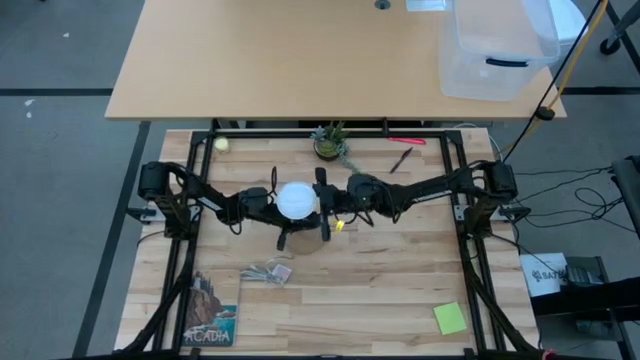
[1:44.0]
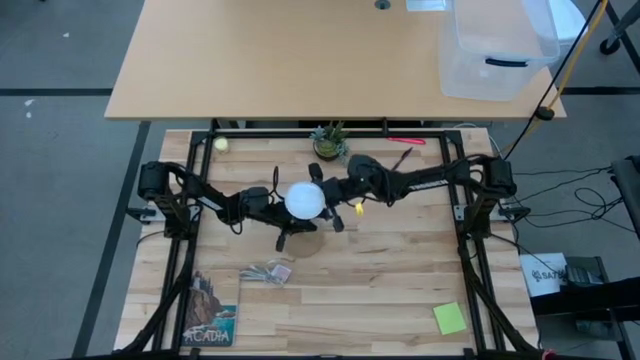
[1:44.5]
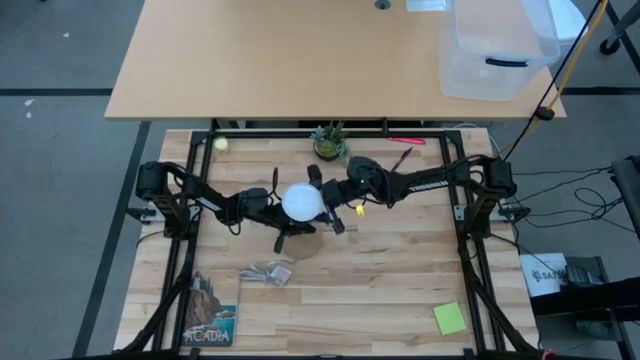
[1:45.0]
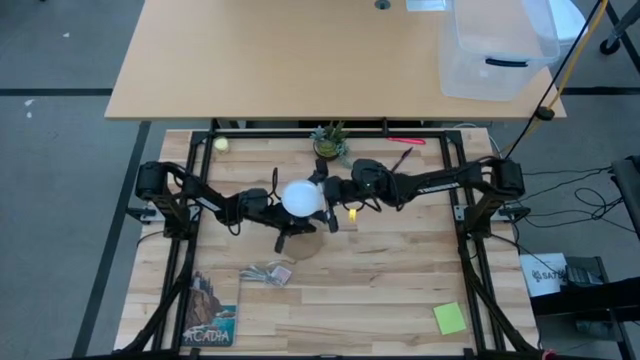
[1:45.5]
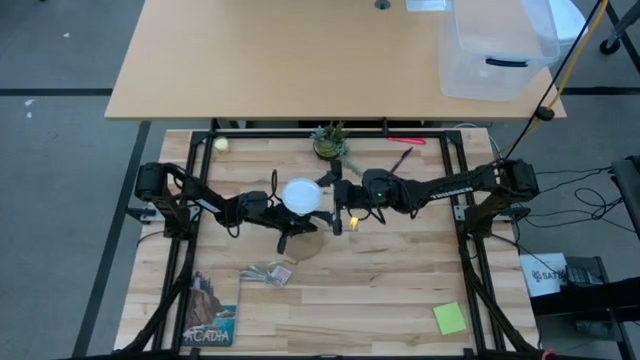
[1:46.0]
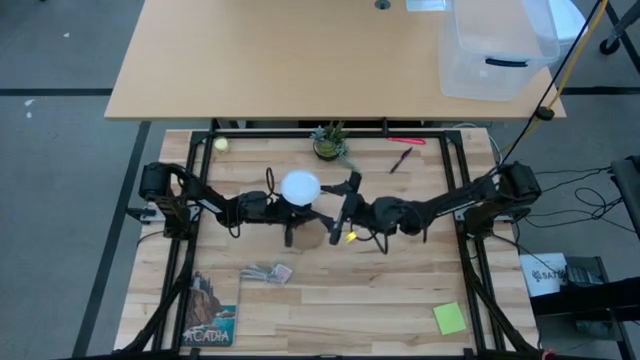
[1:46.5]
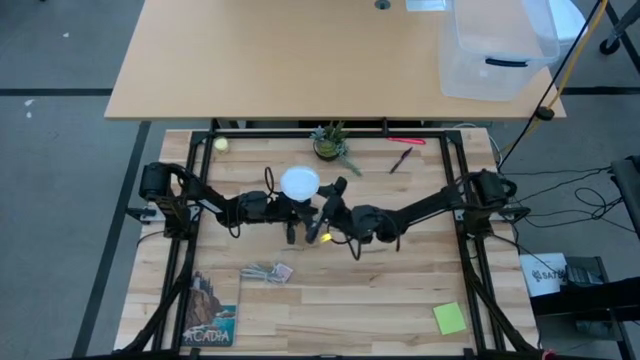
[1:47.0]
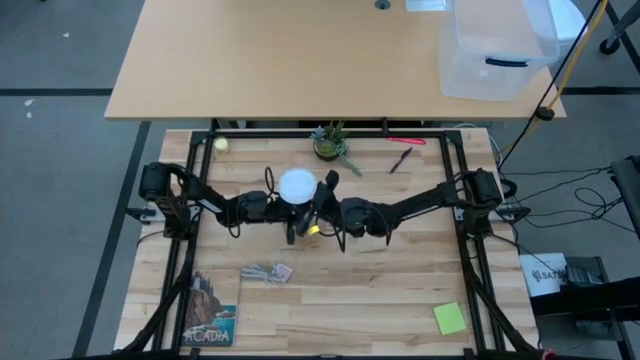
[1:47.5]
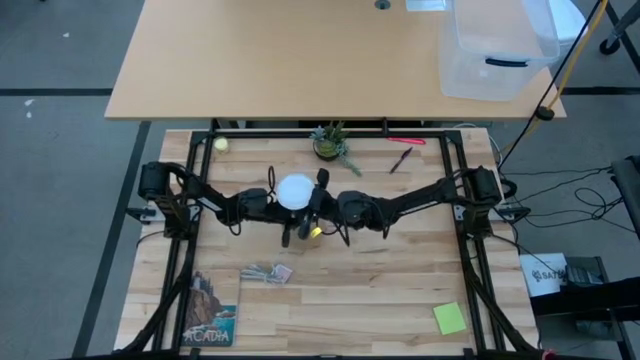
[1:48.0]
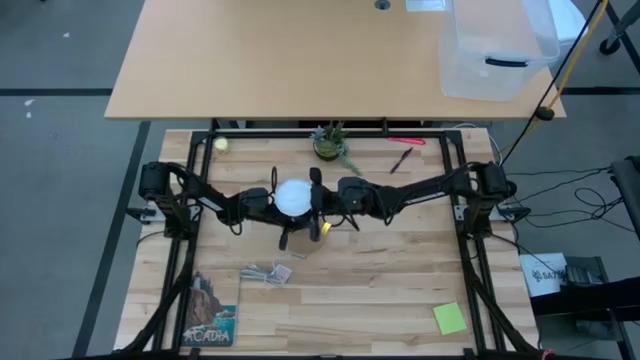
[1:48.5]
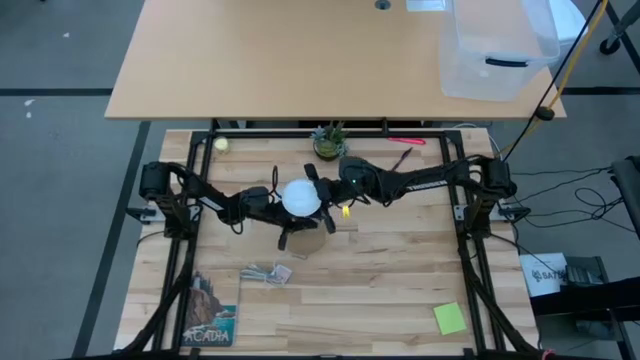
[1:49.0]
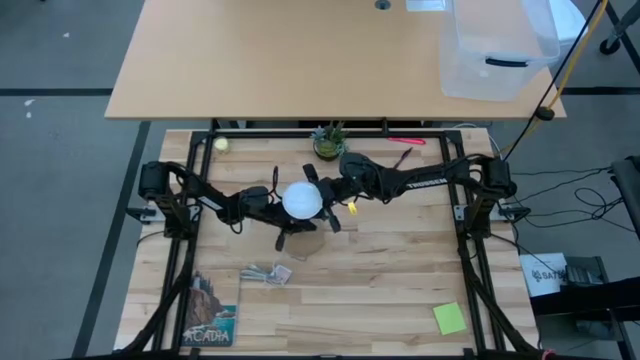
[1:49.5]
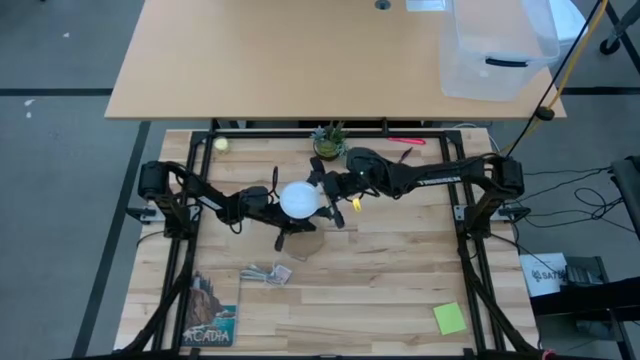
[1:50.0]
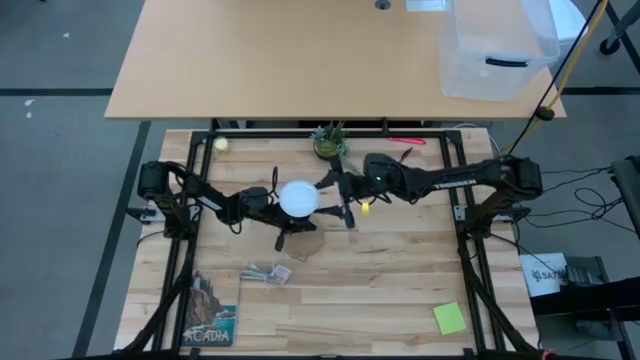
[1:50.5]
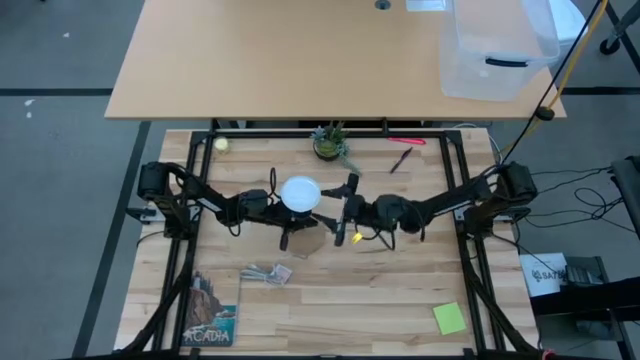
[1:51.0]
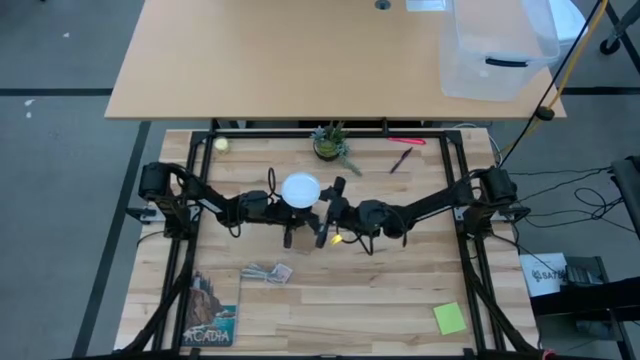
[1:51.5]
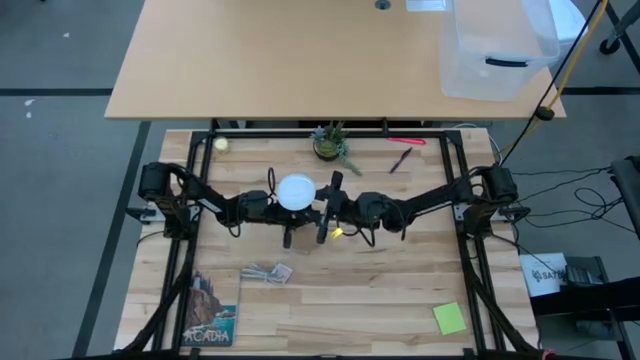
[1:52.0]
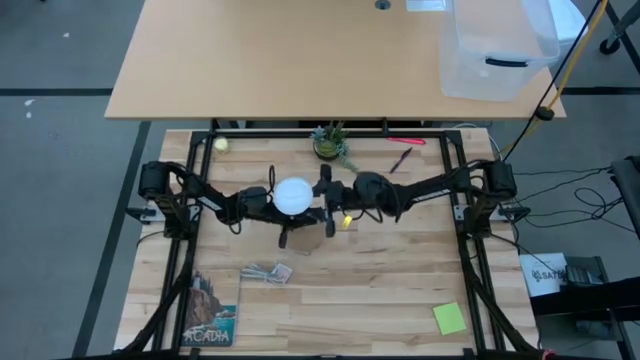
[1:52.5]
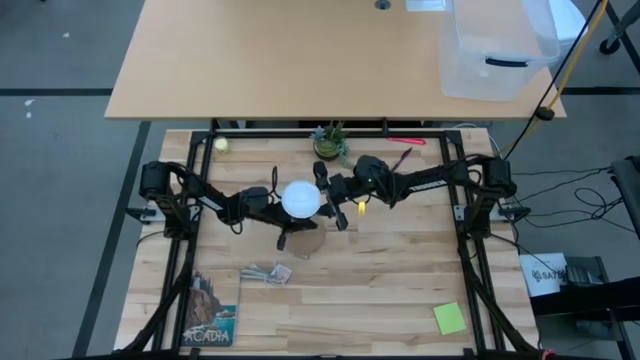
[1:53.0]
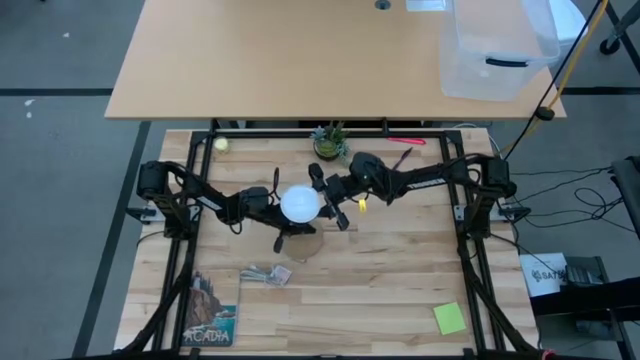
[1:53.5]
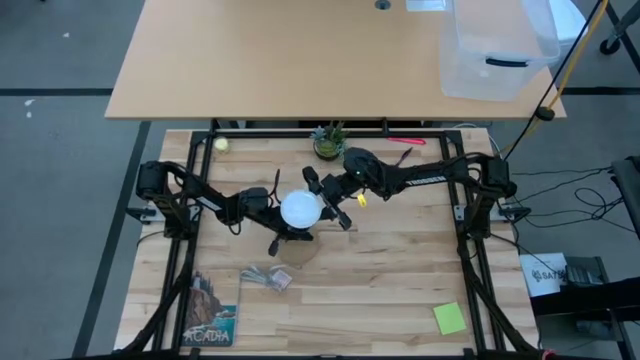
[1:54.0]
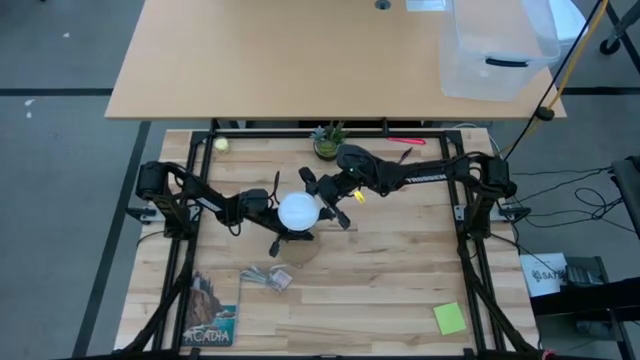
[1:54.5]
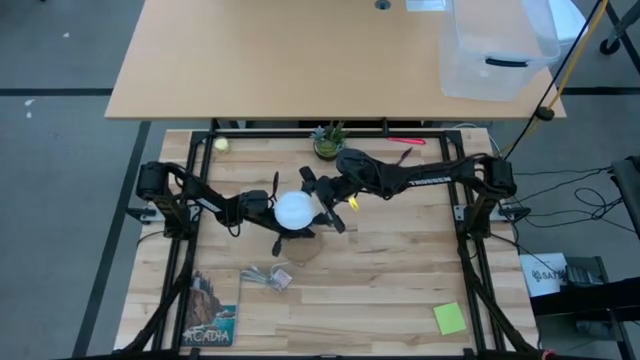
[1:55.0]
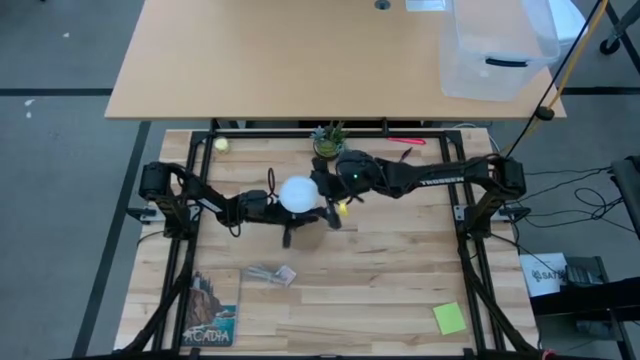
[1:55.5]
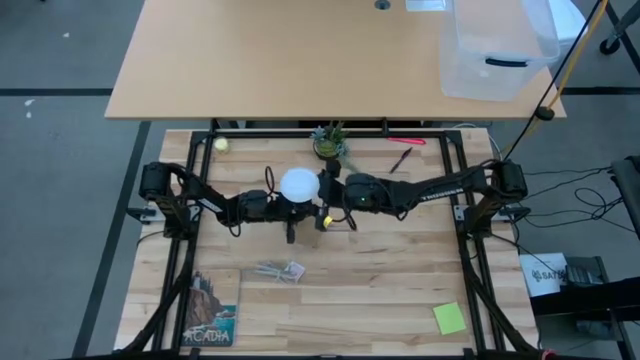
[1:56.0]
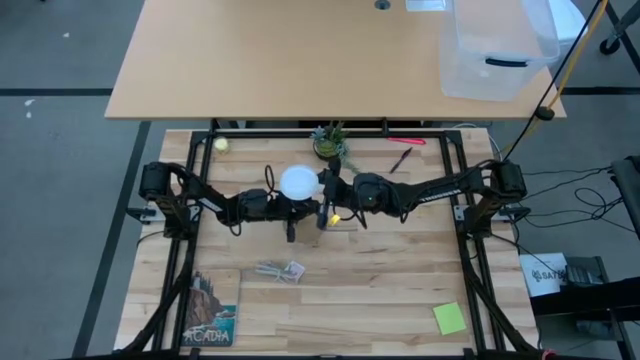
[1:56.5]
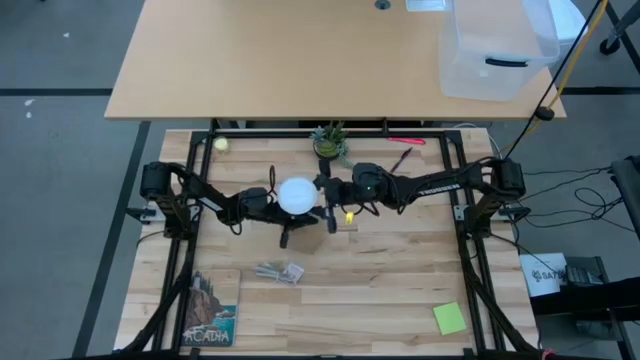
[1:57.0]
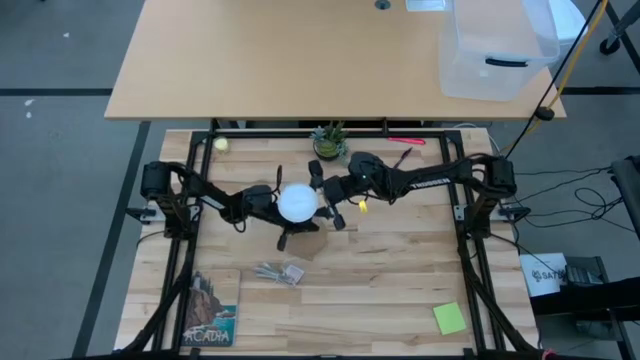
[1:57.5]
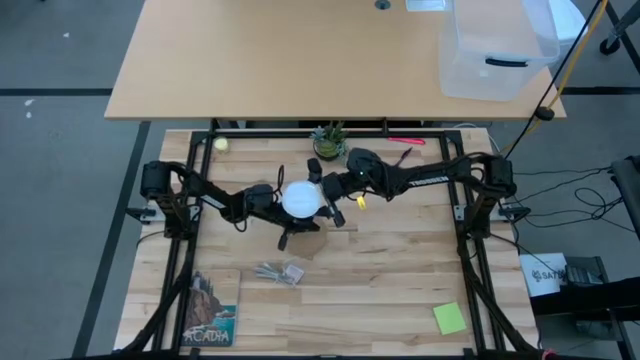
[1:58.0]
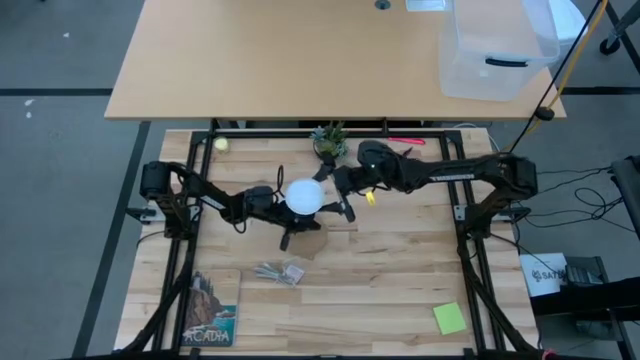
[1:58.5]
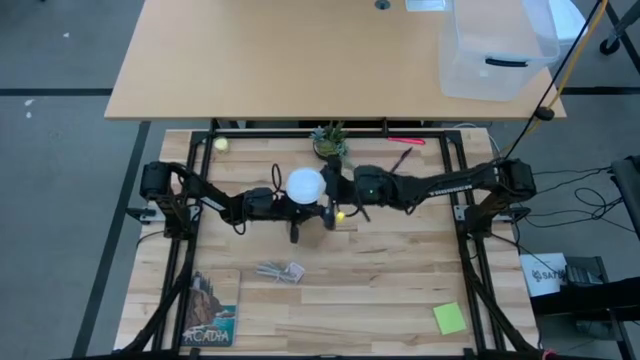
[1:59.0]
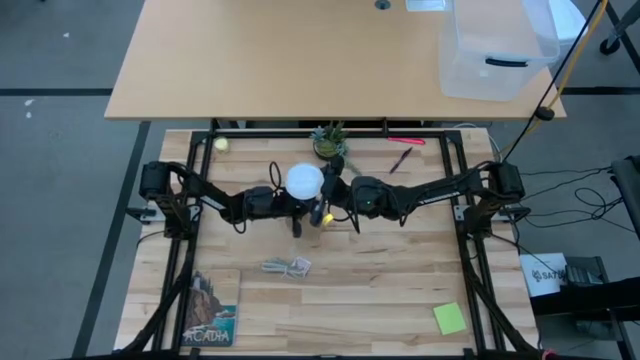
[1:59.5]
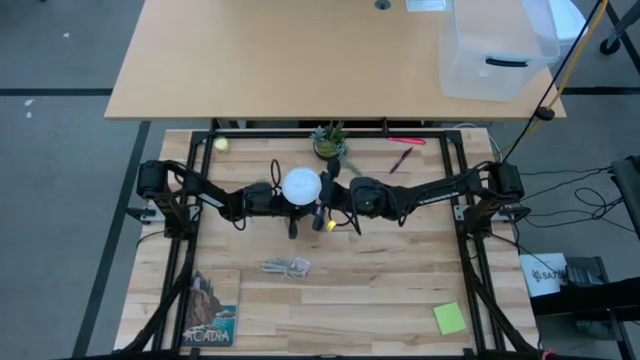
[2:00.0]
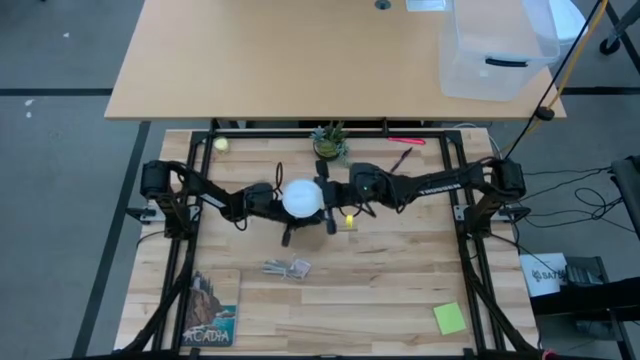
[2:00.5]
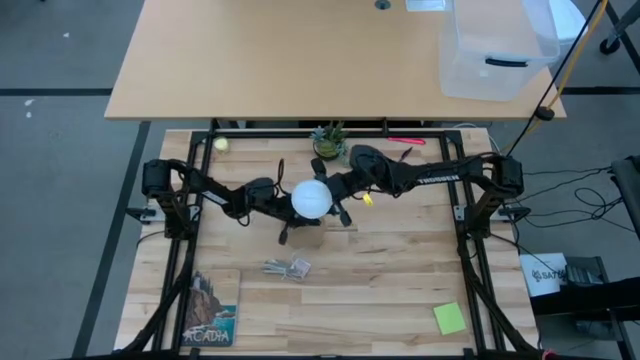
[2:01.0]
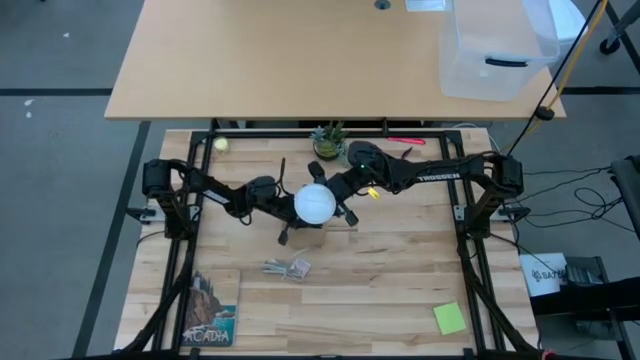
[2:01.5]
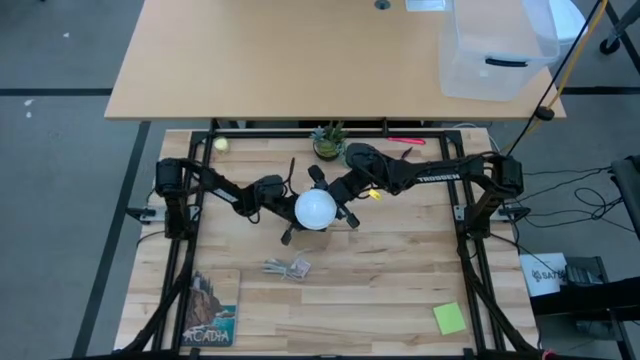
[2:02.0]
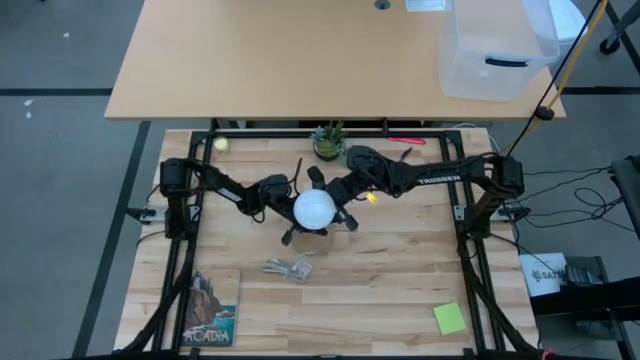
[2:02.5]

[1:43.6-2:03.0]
Task: Screw lightbulb
Remove the lightbulb from the lamp

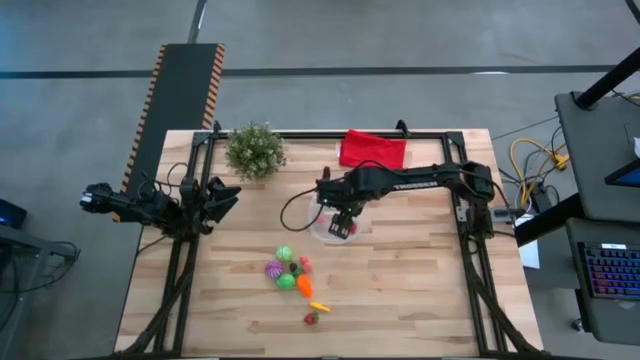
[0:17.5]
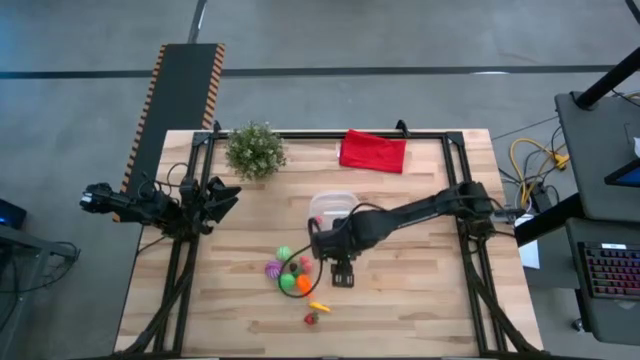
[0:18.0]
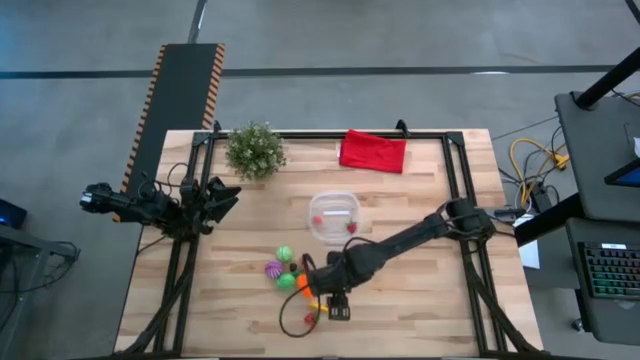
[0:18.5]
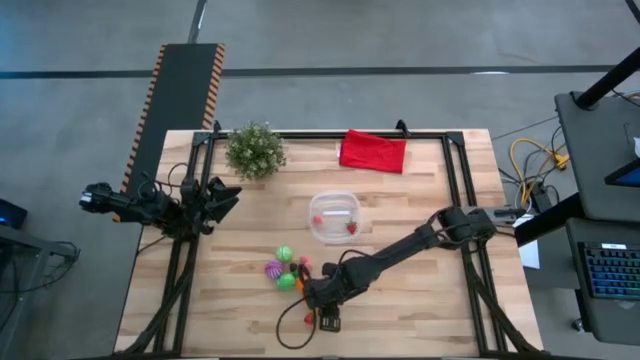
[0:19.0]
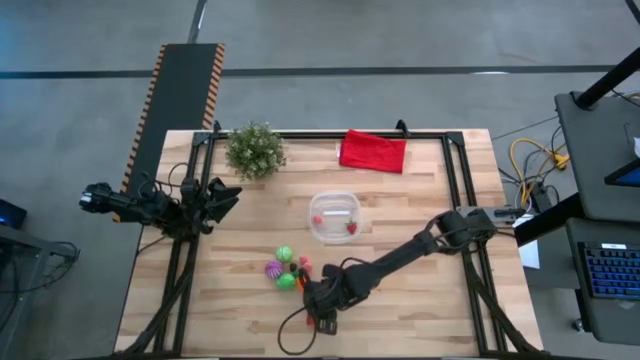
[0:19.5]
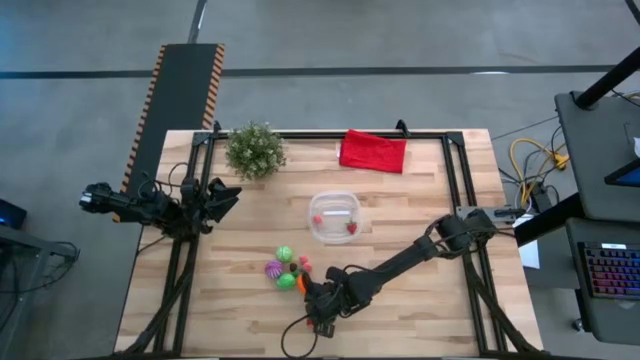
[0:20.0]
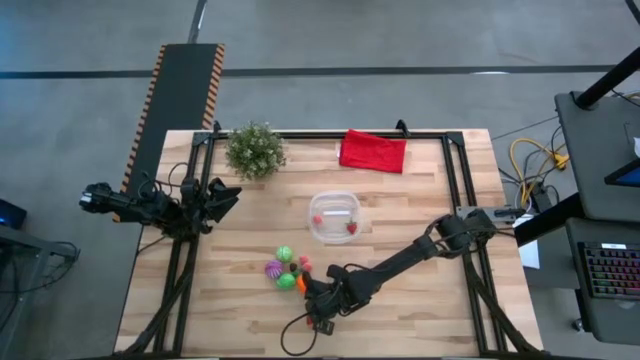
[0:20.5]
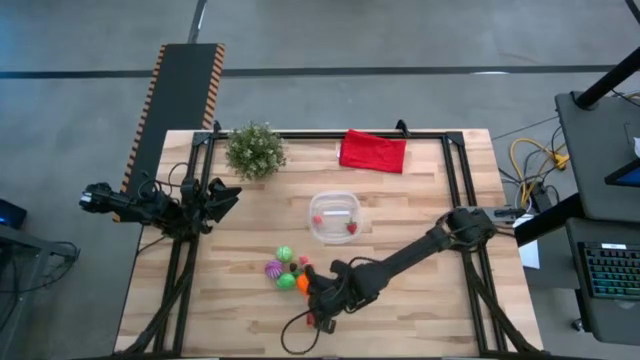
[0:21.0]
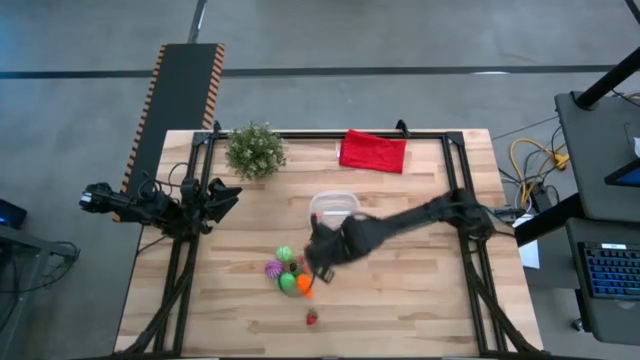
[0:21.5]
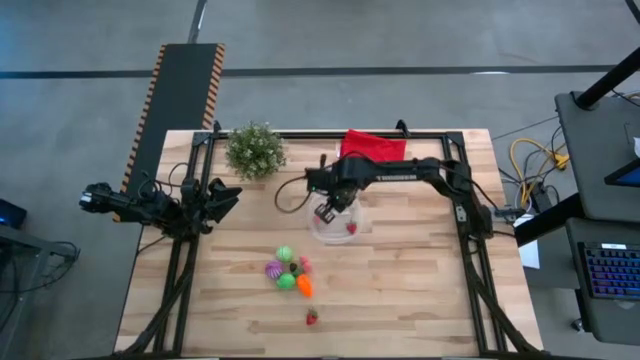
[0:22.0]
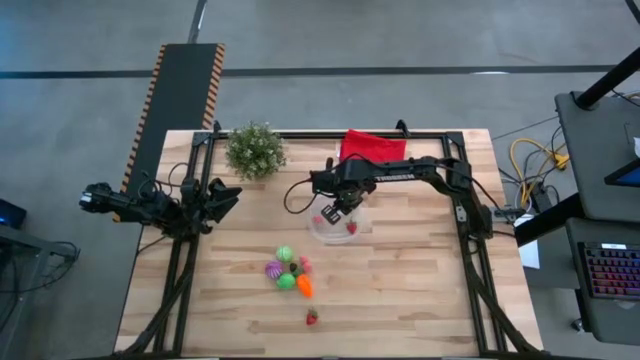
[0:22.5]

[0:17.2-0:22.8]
Task: Pick and placing Produce into tupperware
Put the yellow corn into the transparent container
